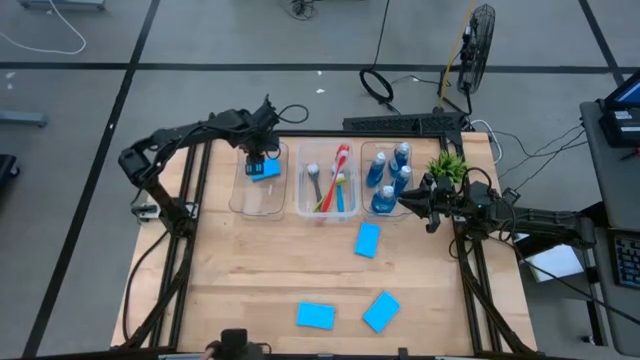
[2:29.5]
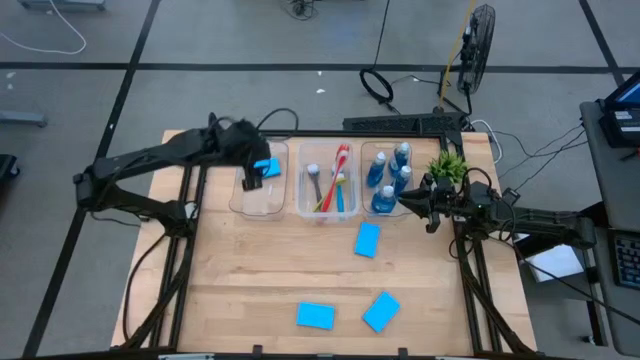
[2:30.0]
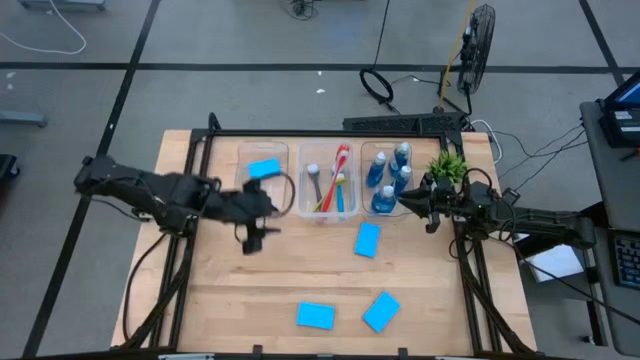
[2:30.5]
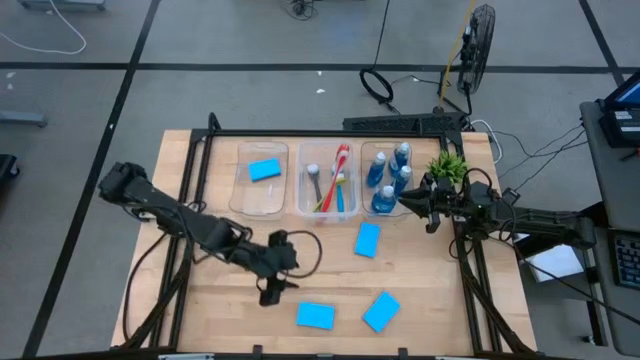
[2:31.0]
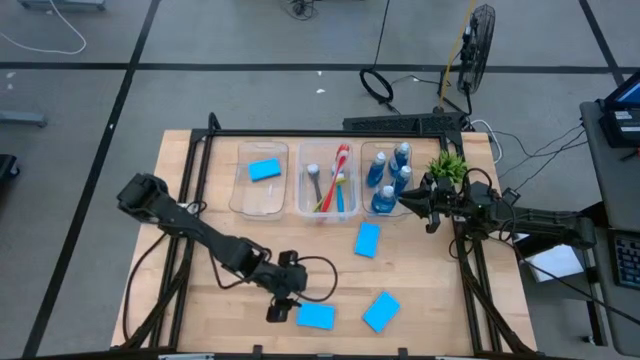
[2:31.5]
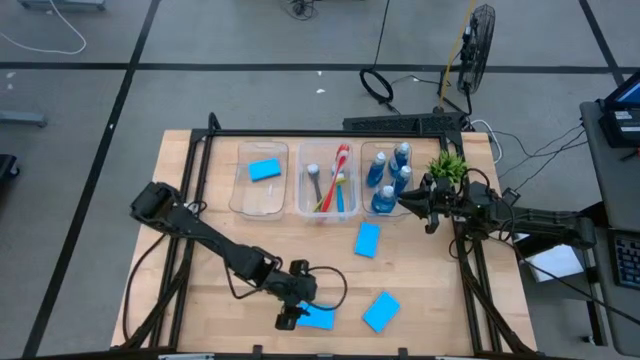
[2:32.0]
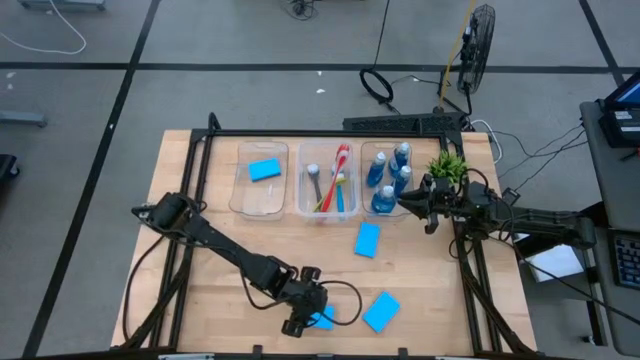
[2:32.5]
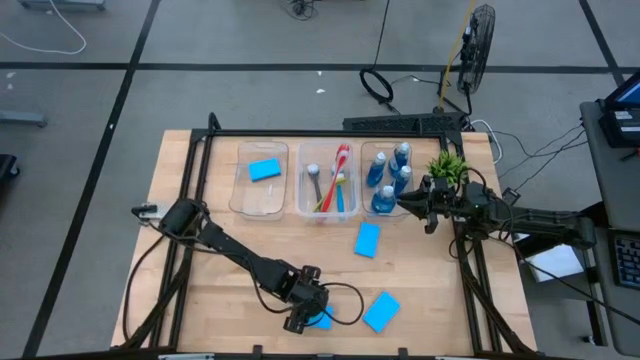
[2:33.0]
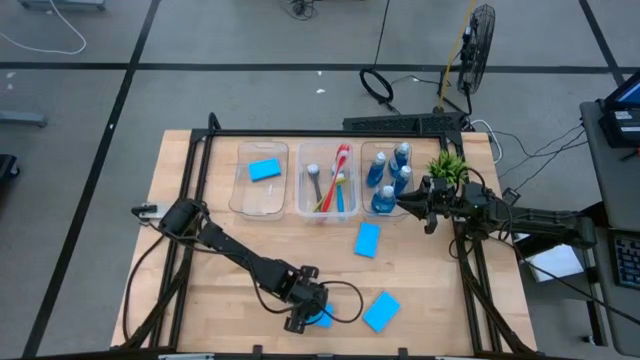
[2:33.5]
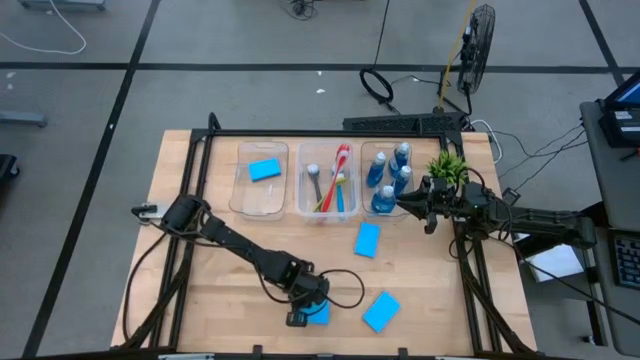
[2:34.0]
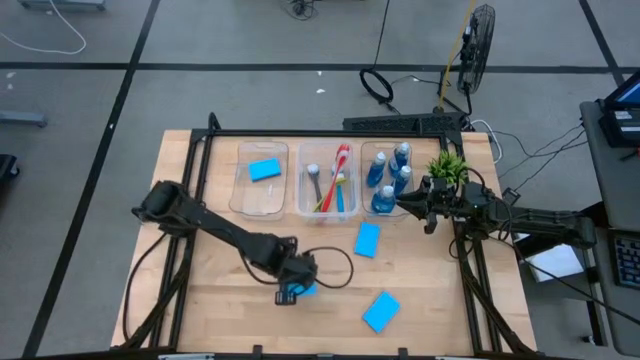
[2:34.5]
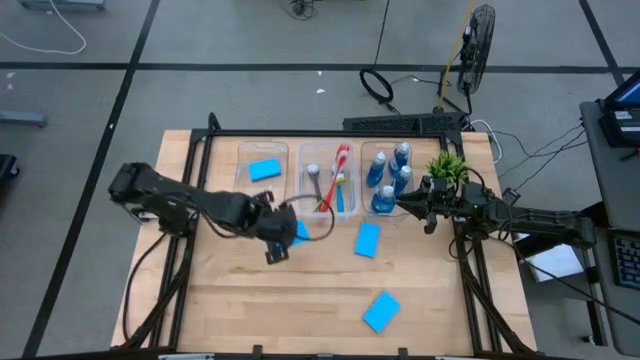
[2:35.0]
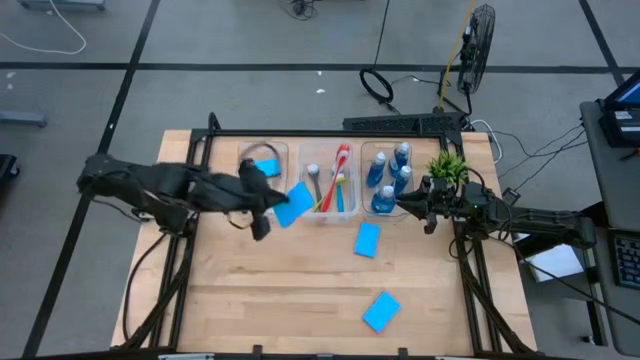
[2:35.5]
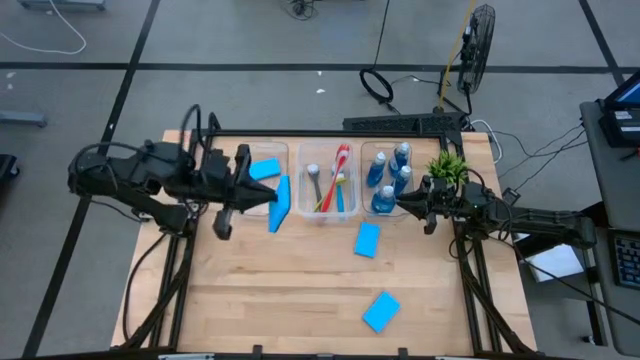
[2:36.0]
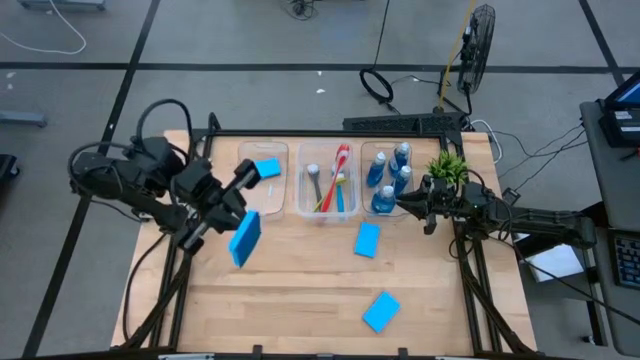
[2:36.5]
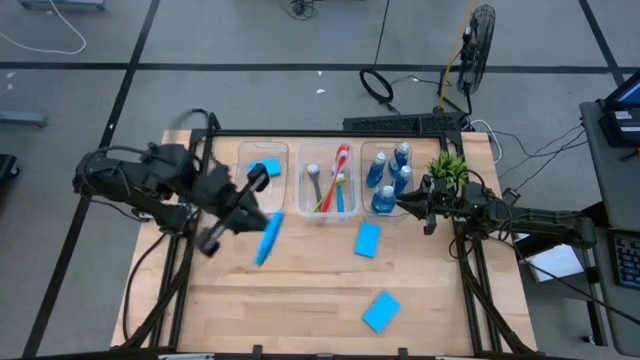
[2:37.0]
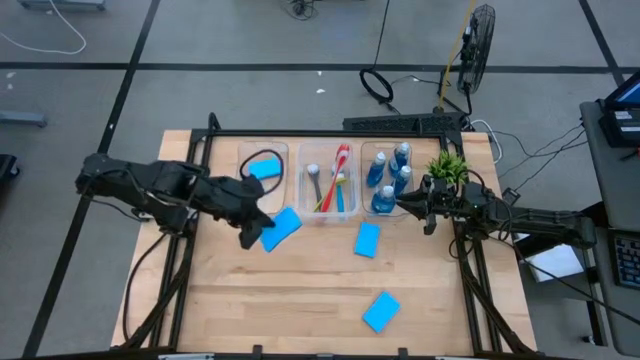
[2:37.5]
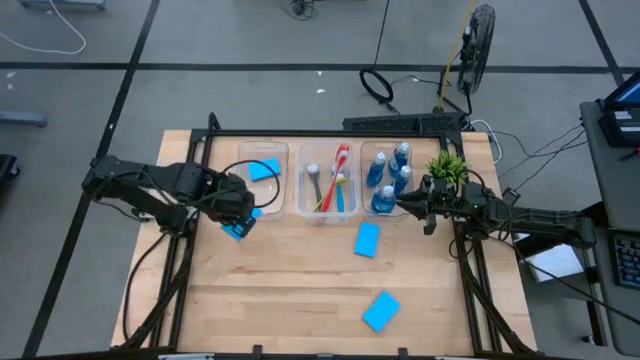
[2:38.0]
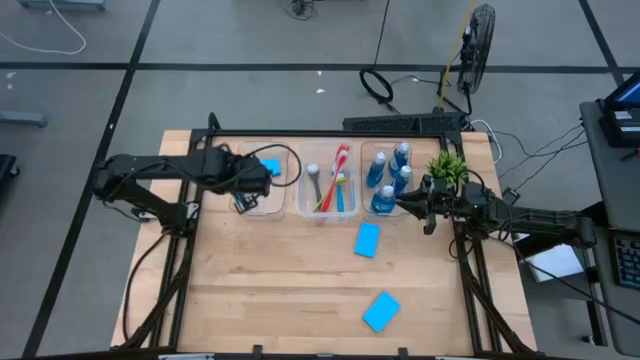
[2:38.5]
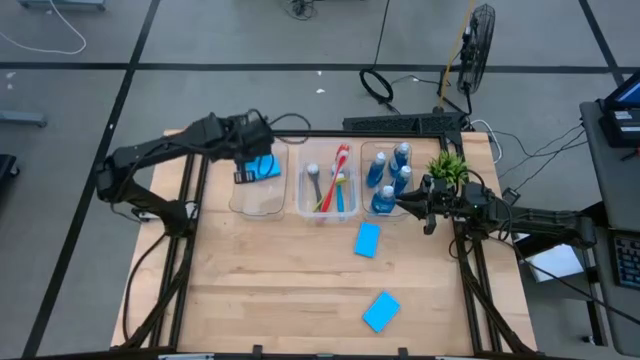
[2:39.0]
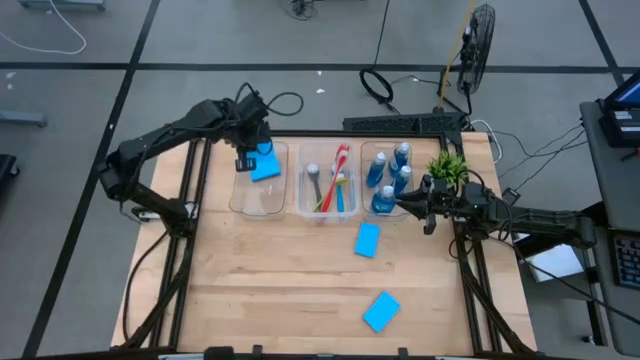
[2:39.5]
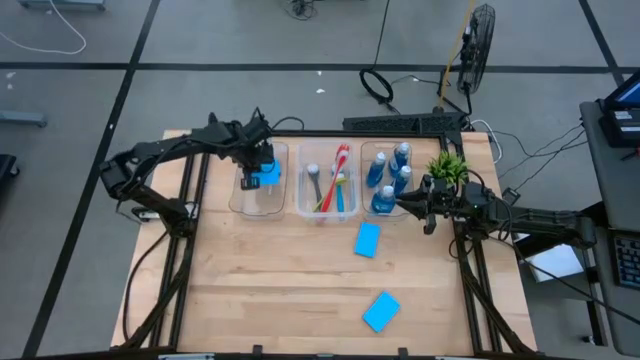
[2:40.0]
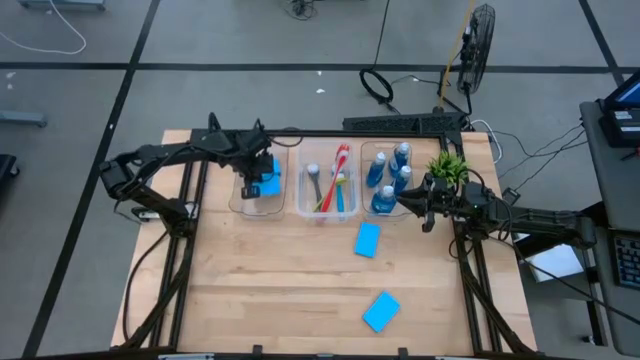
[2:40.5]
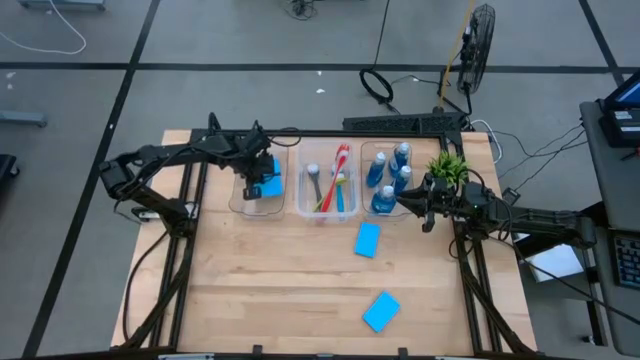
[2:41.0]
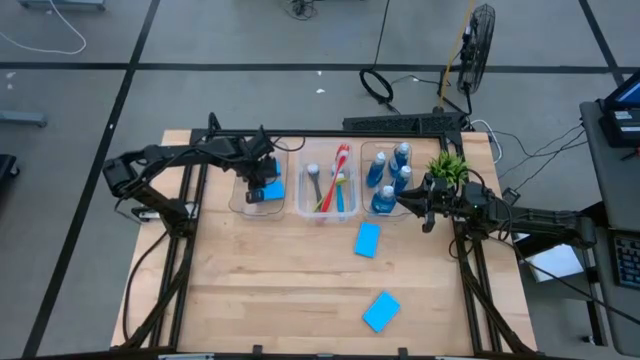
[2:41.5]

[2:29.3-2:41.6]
Task: Pick & Place Kitchen Sink Supplies
Put the blue sponge into the left transparent bin

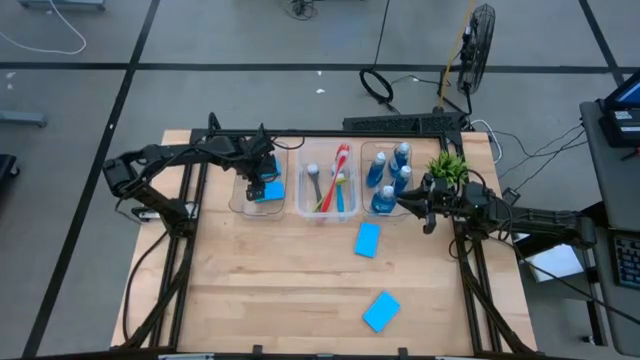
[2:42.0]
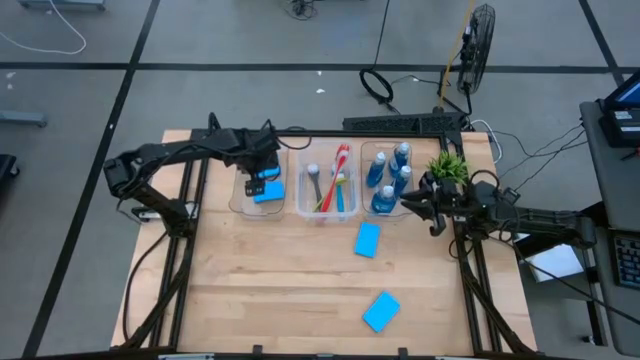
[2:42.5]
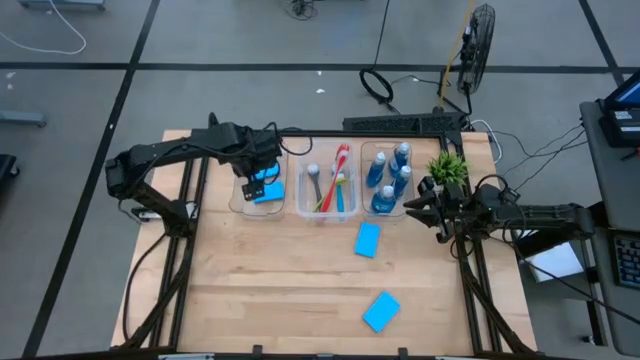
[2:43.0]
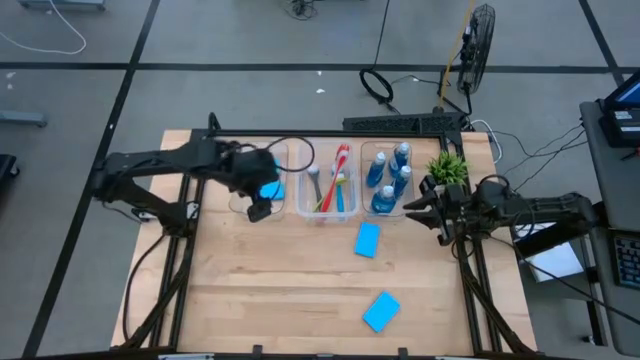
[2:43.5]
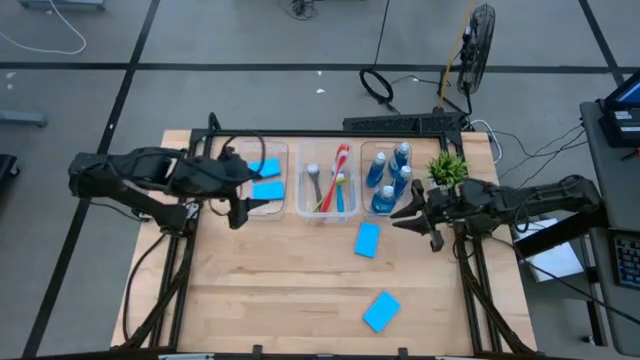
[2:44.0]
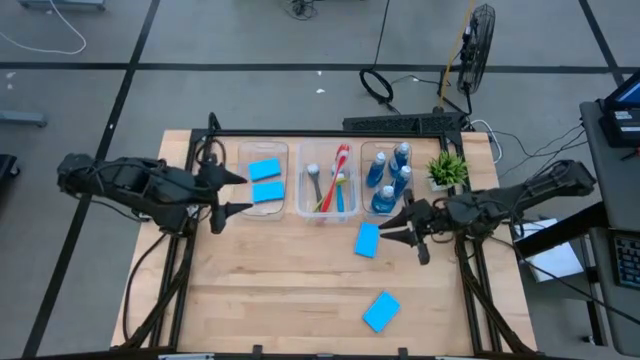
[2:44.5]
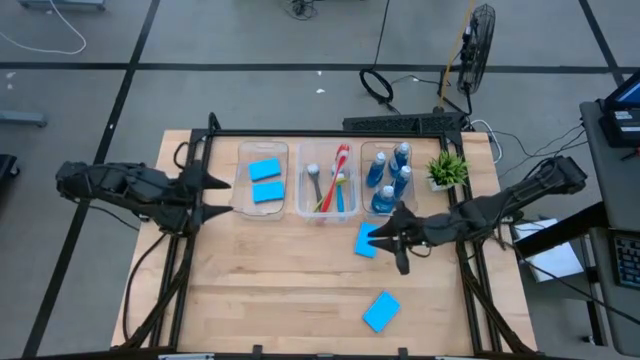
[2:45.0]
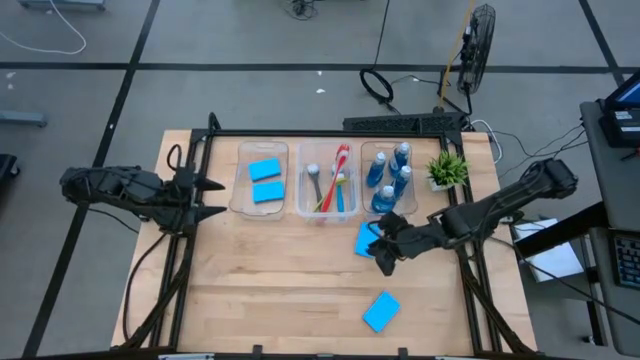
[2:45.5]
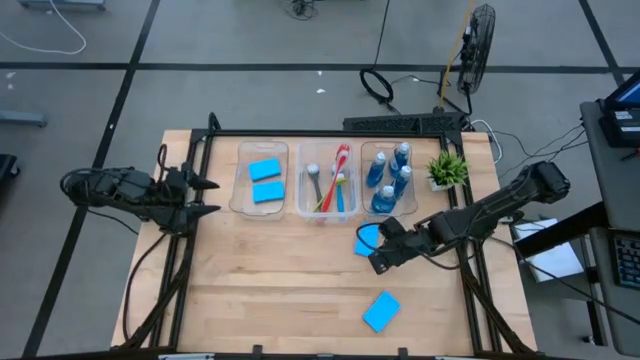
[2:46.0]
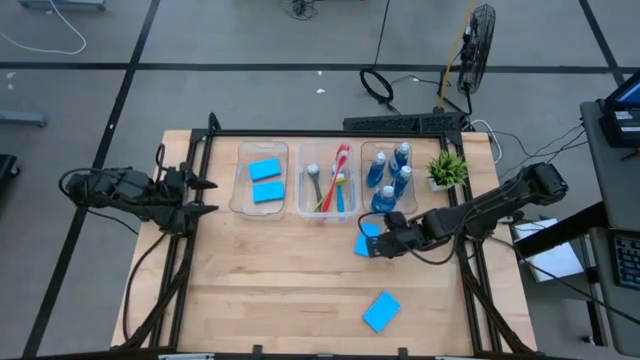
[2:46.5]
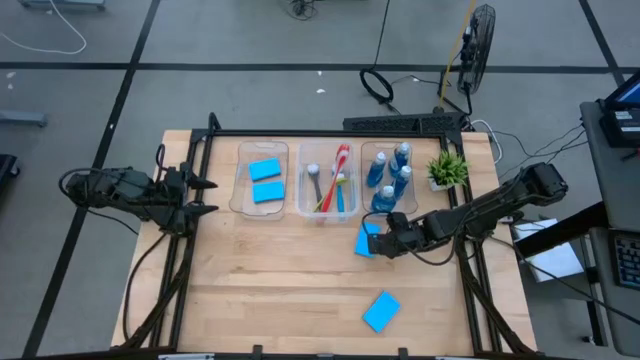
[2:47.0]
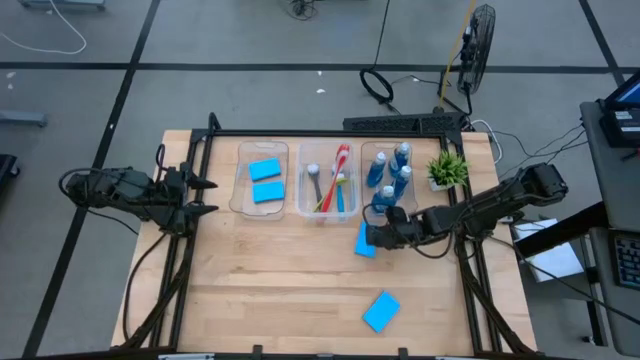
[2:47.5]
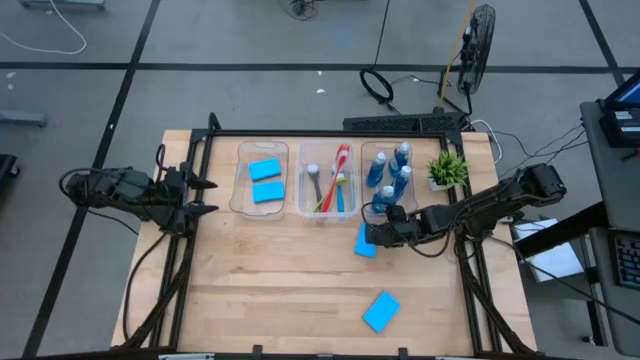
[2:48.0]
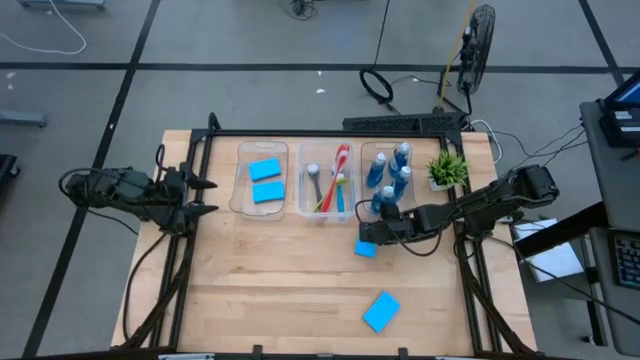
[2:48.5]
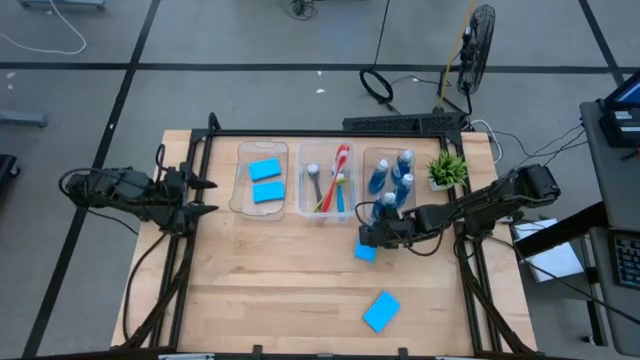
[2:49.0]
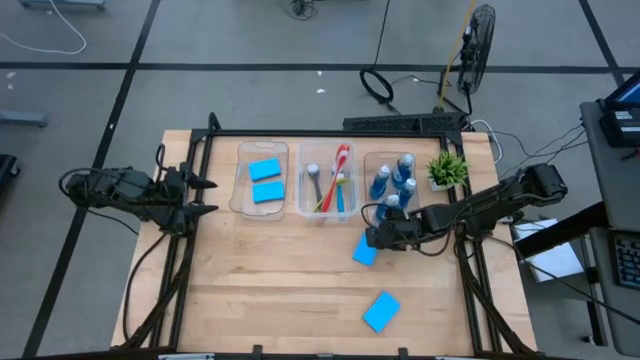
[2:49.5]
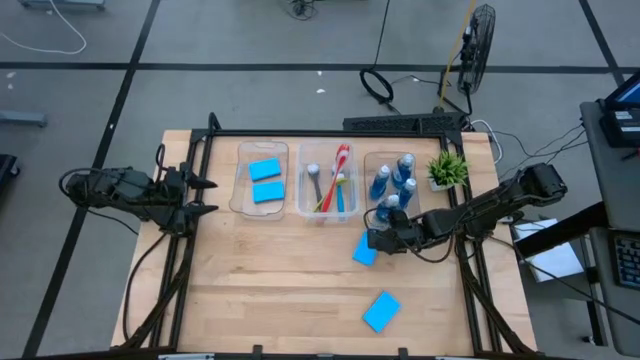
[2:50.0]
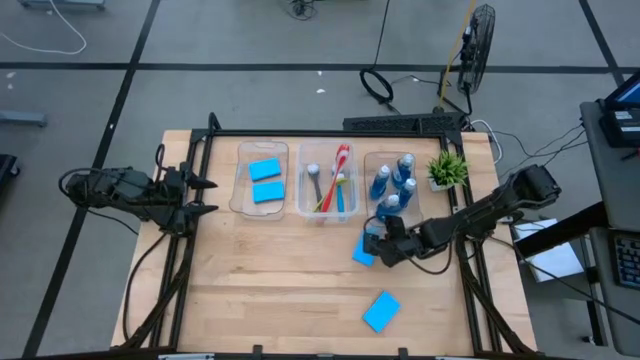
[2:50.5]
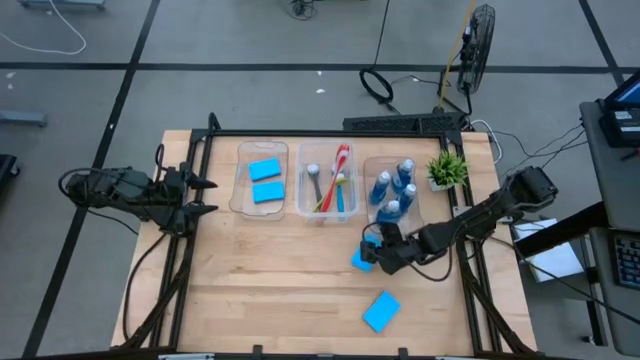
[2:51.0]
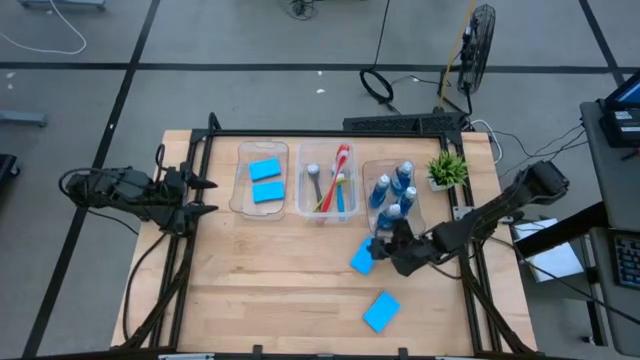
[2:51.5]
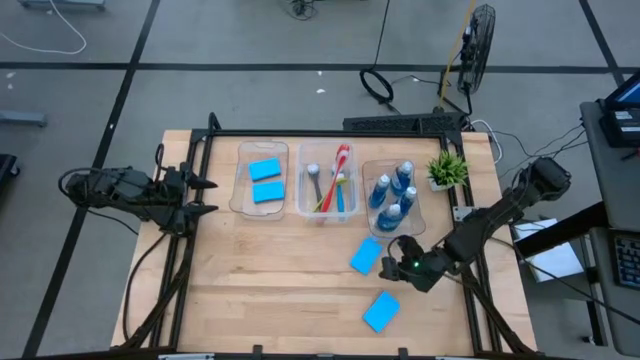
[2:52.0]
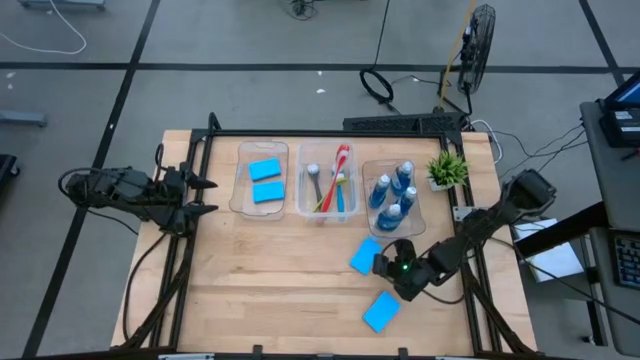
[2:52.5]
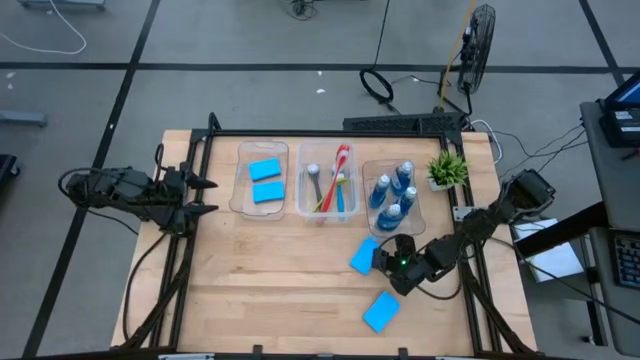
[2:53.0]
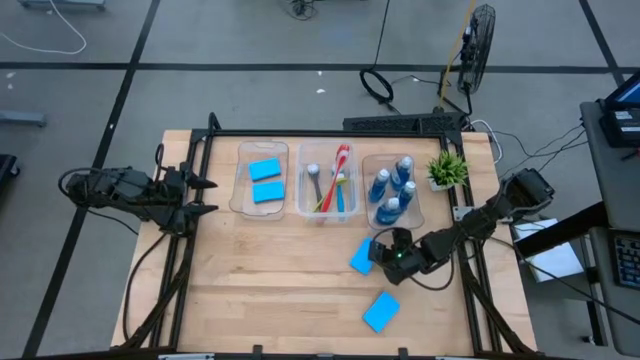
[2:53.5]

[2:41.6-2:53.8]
Put the blue sponge into the left transparent bin
